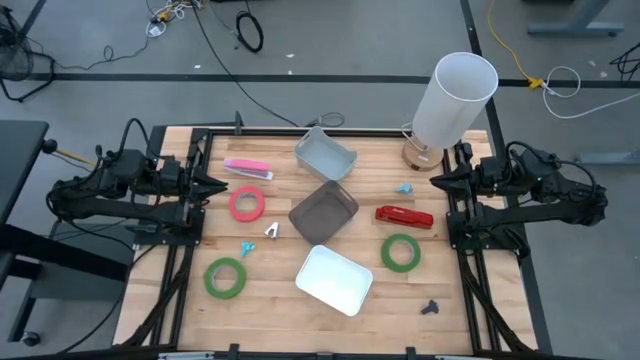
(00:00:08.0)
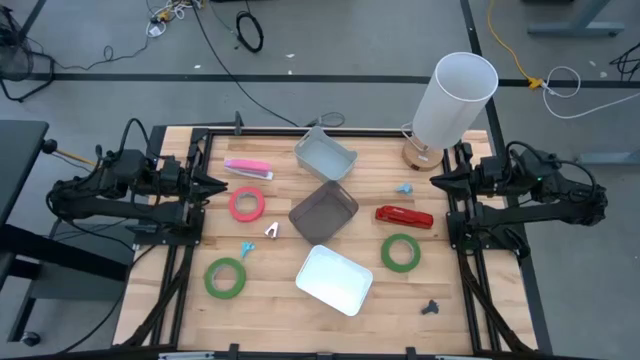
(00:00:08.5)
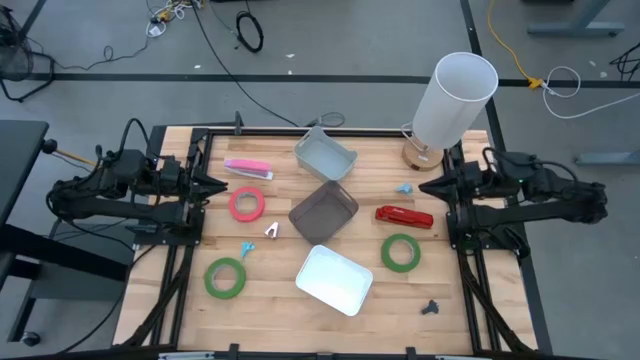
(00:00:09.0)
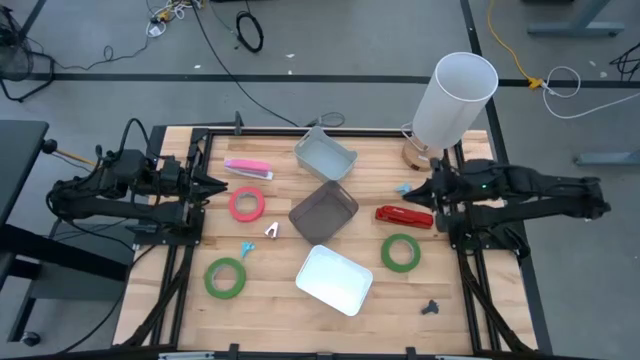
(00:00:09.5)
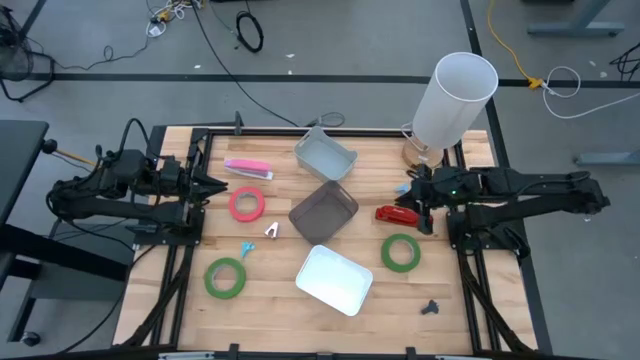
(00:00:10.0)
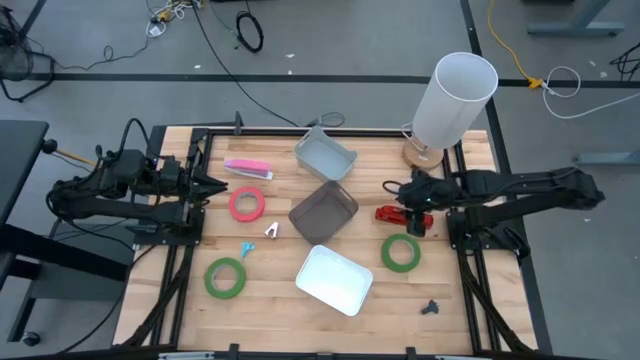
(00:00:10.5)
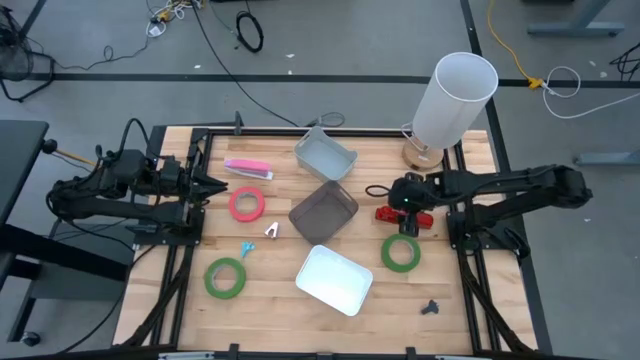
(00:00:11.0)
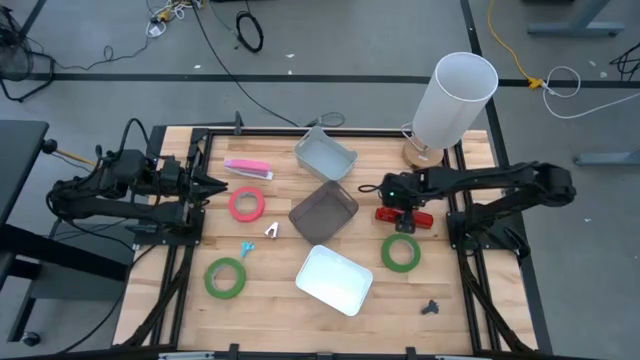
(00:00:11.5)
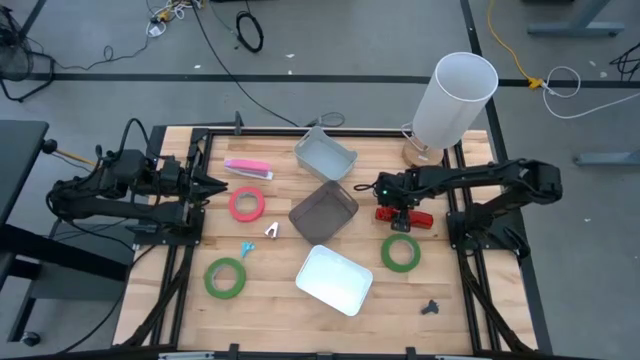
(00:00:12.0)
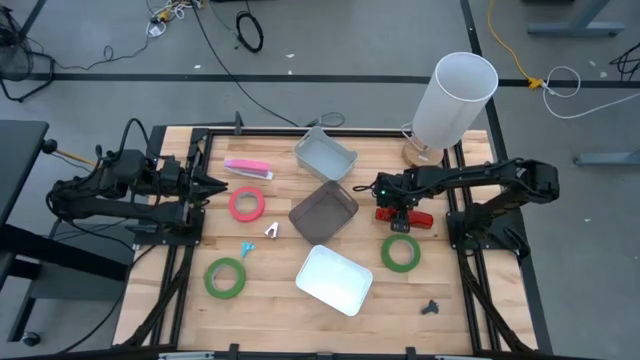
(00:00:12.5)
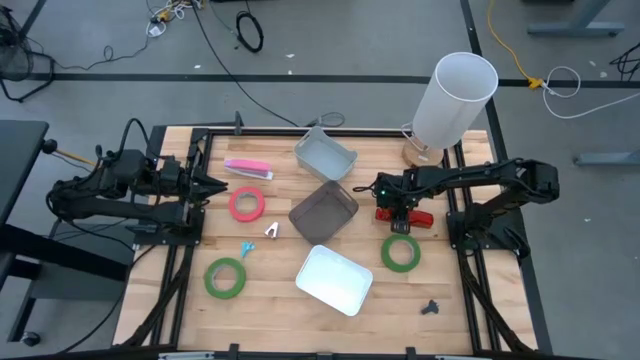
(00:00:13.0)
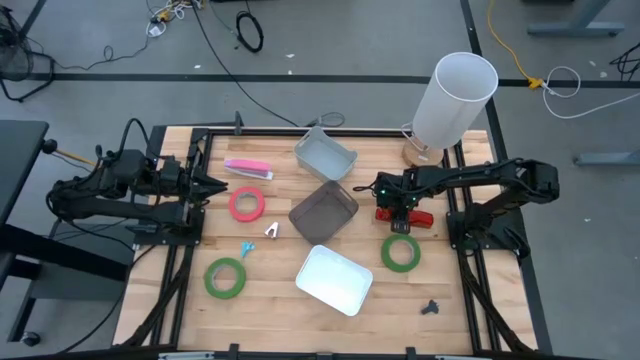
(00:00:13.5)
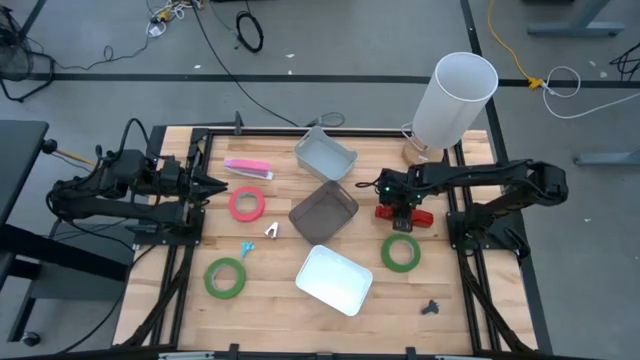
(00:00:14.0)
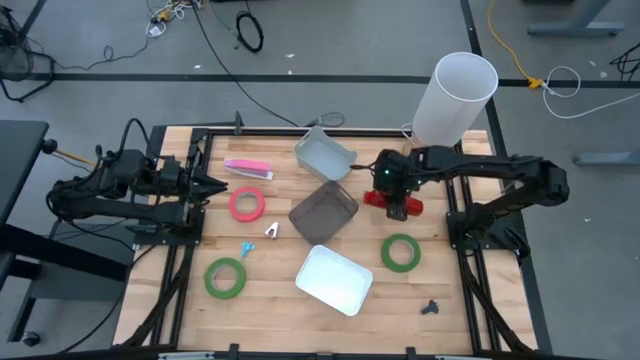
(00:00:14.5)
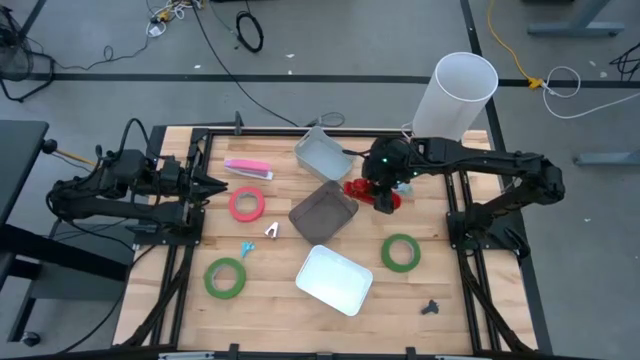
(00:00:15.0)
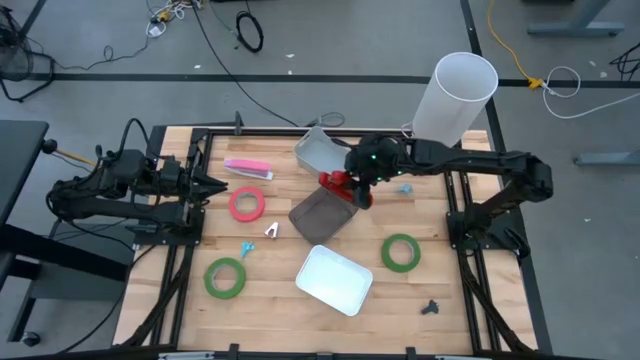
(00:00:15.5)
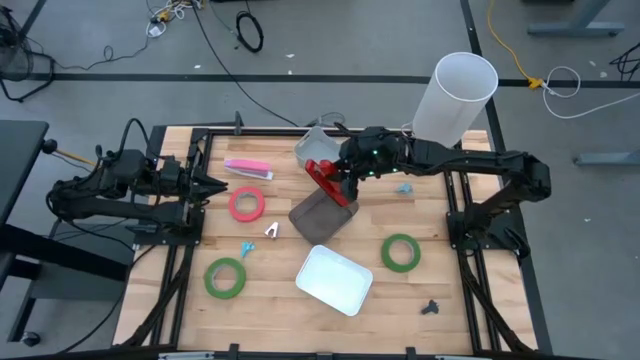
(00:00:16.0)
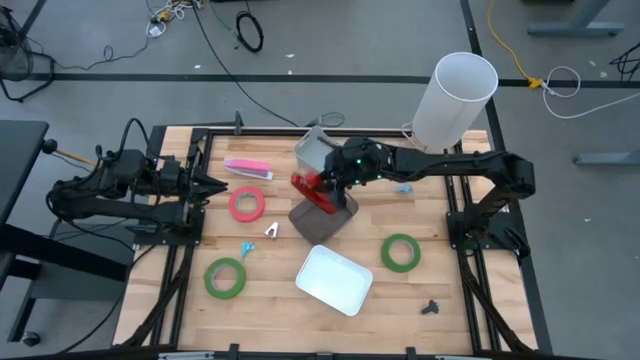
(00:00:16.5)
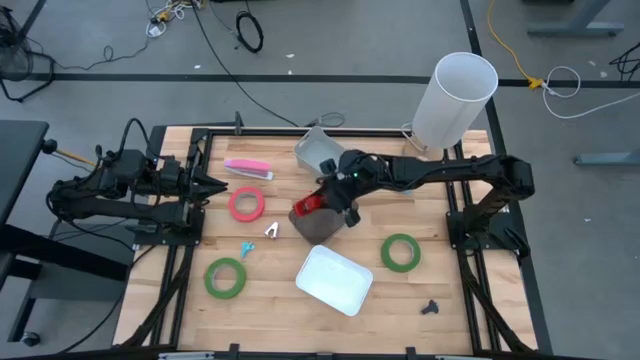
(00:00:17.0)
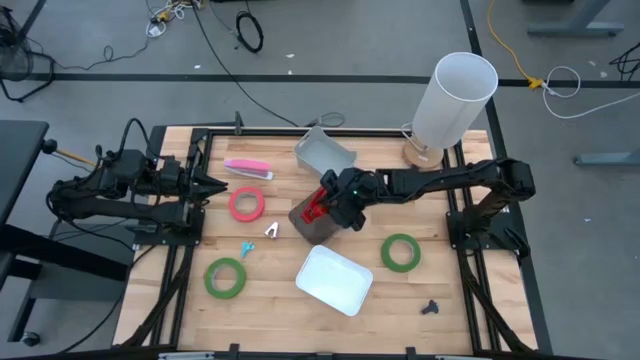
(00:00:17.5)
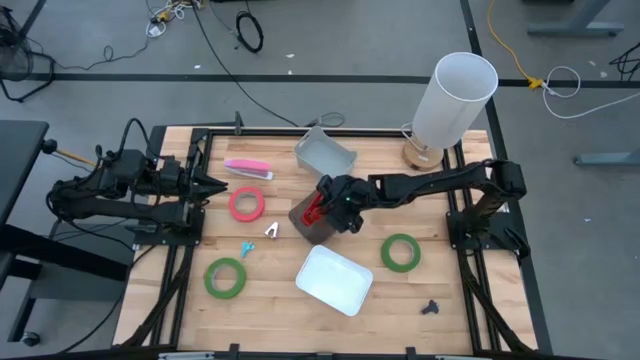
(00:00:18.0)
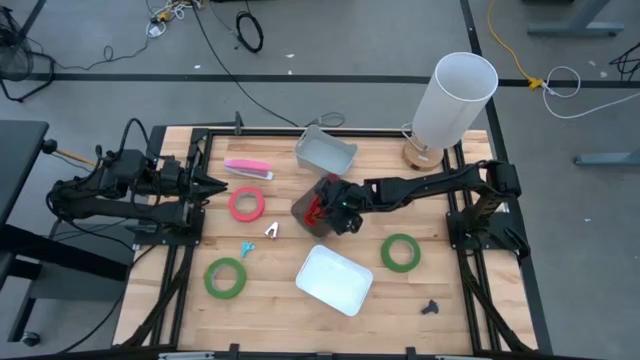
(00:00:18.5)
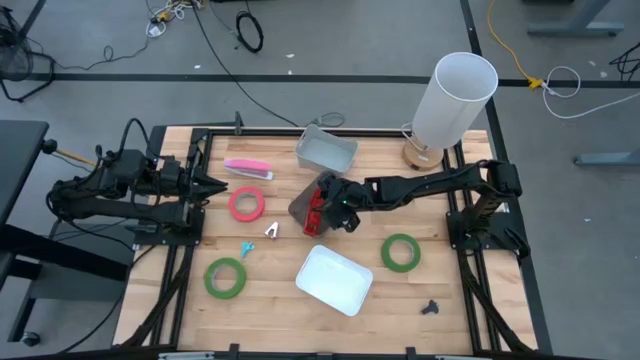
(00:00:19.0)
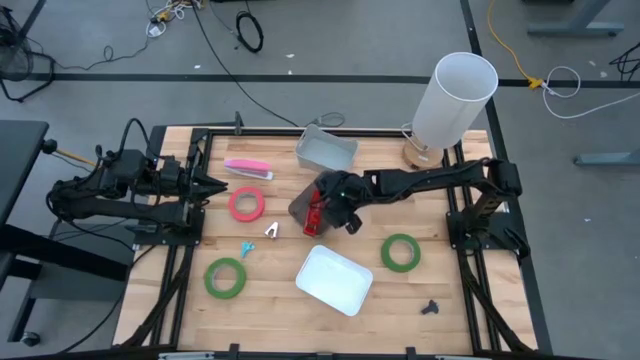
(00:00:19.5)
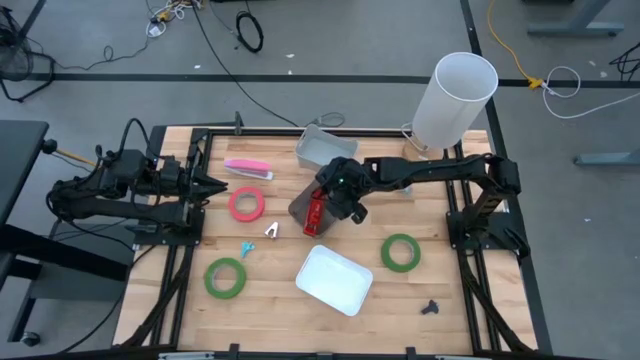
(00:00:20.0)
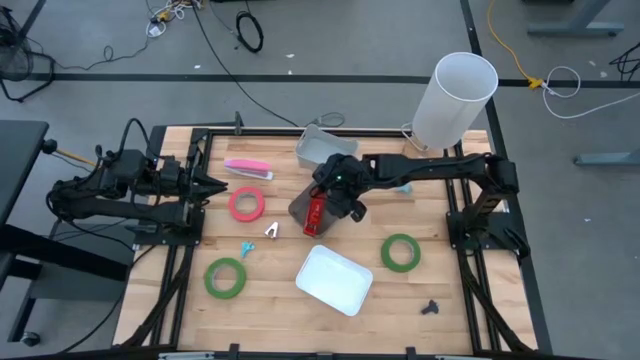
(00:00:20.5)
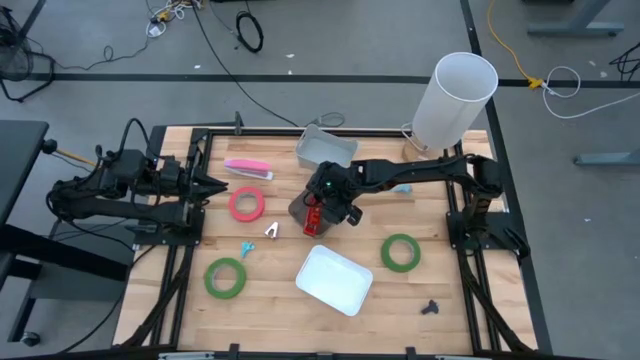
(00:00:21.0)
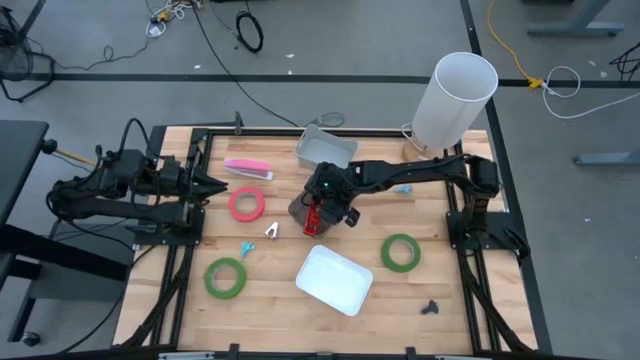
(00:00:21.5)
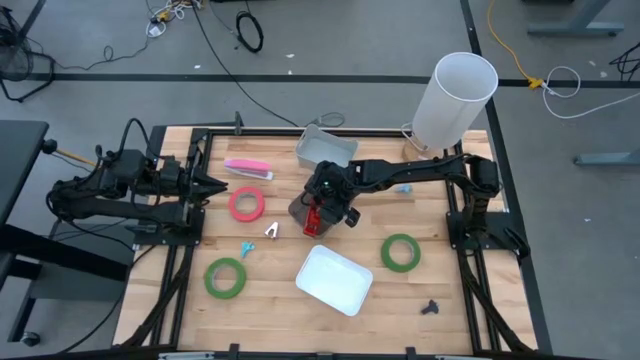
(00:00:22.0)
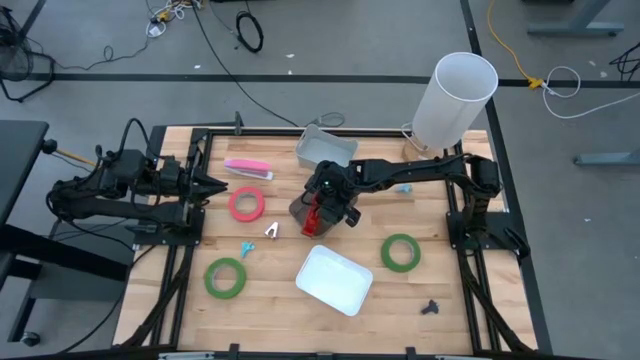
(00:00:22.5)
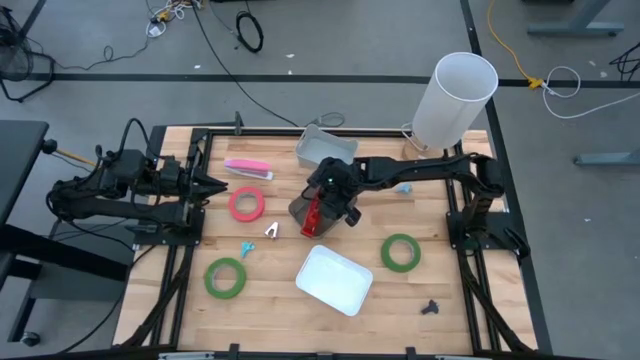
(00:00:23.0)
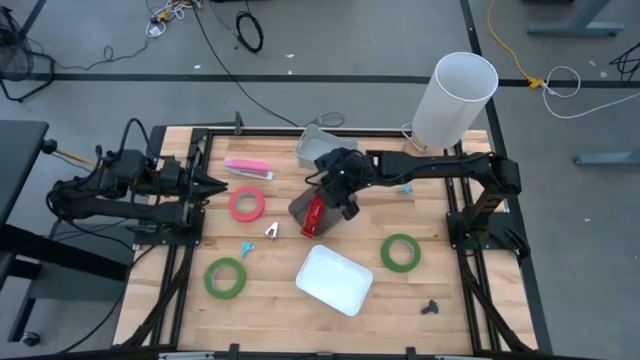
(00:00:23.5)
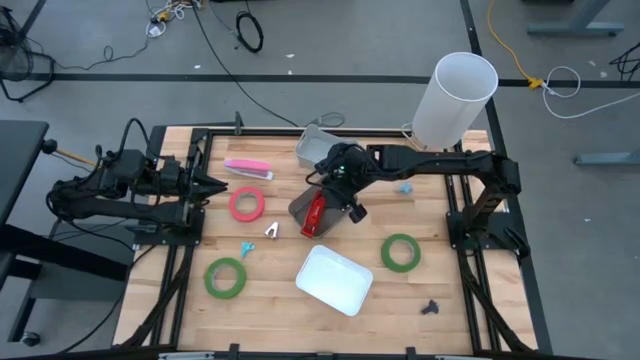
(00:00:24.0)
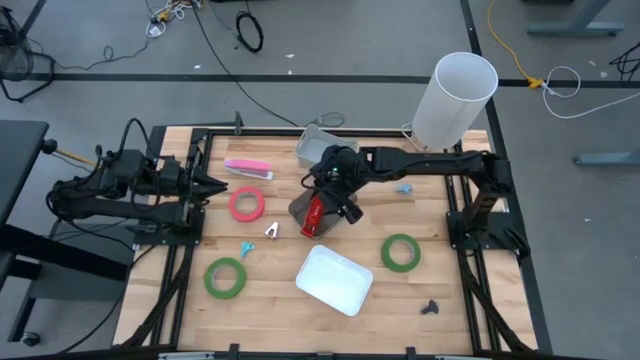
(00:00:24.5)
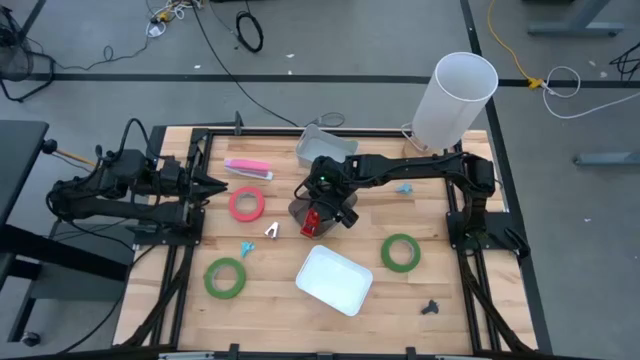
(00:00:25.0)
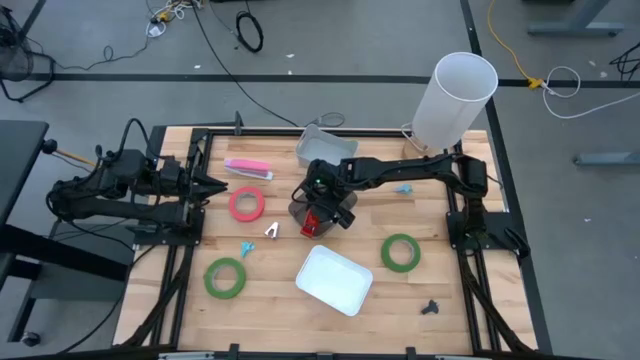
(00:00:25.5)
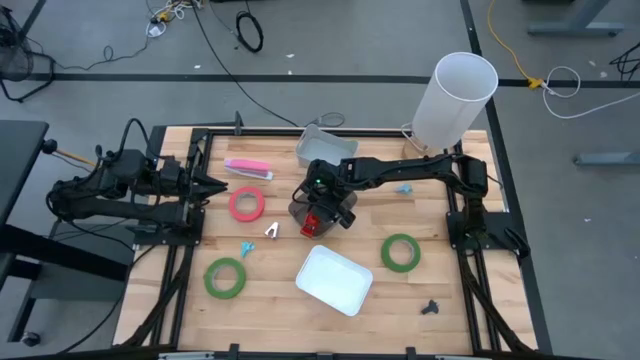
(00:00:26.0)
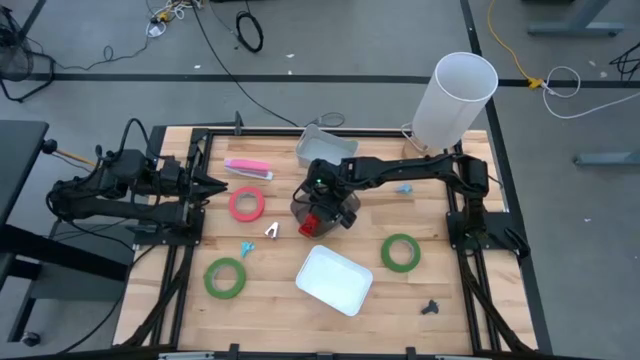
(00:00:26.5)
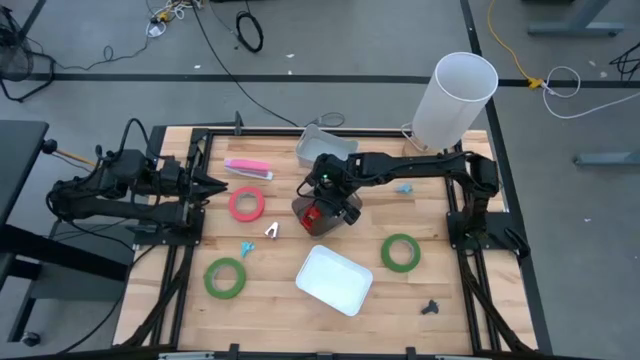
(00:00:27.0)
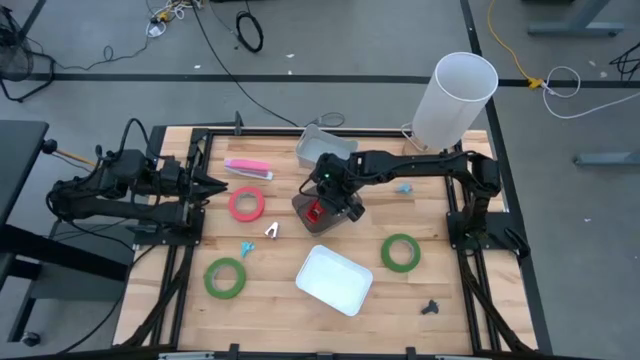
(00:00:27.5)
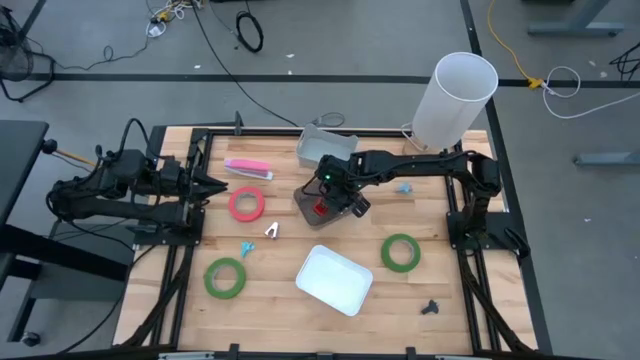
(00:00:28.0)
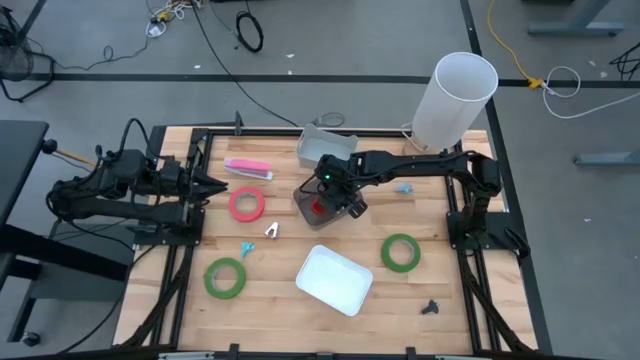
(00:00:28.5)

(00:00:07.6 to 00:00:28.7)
Task: Pick and place Stapler, Stapler remover, tape
Put the red stapler into the black bin
